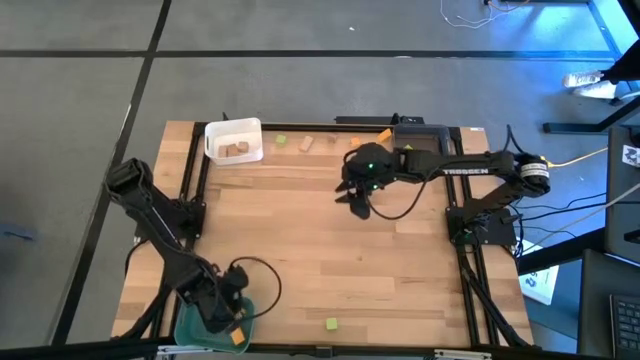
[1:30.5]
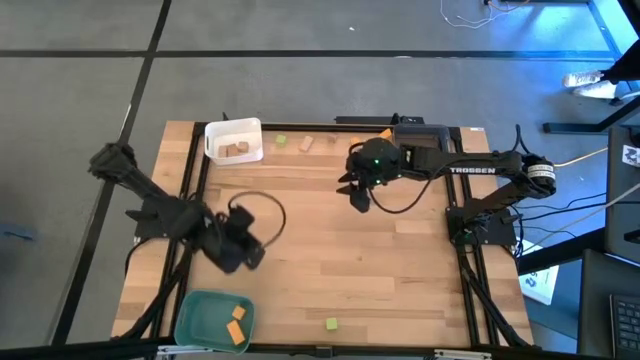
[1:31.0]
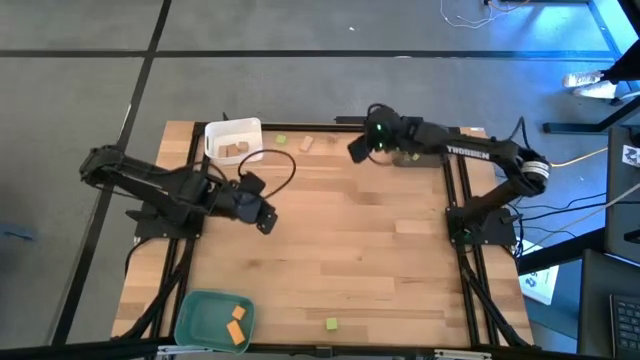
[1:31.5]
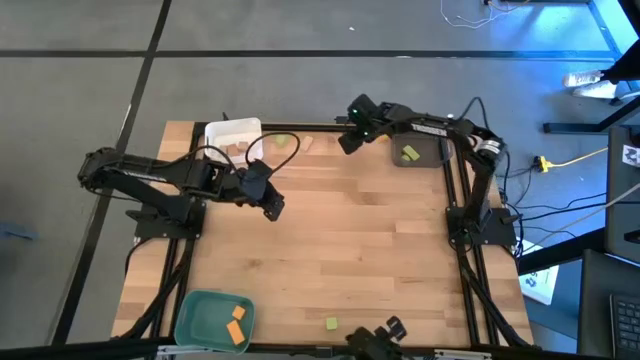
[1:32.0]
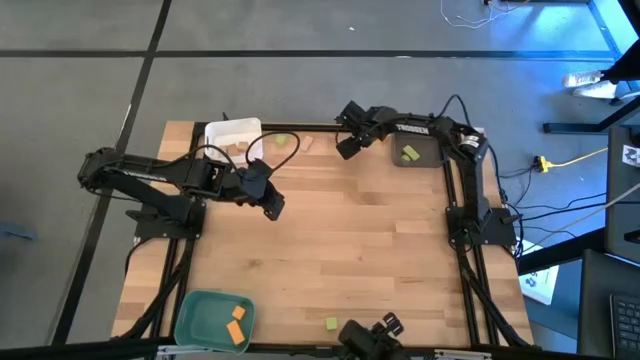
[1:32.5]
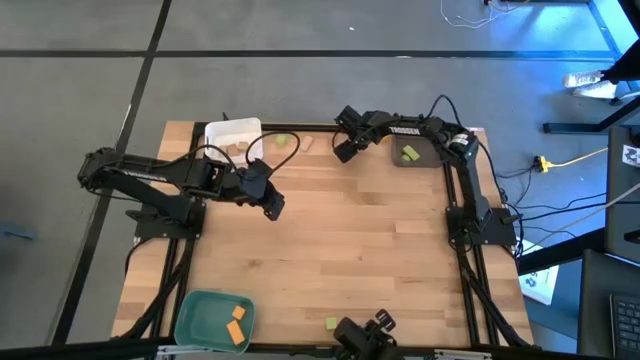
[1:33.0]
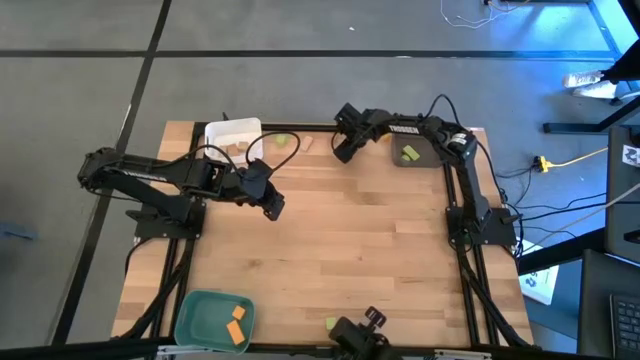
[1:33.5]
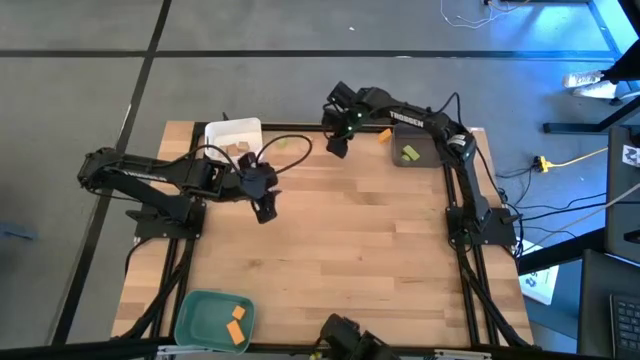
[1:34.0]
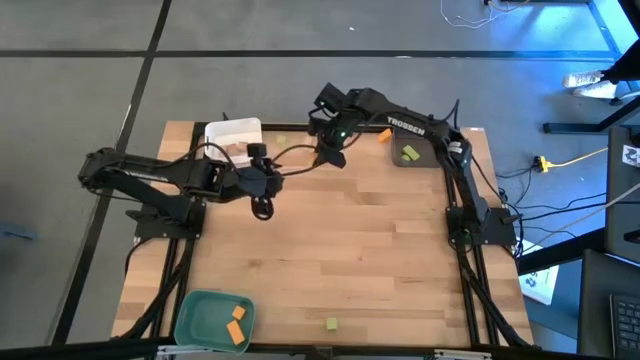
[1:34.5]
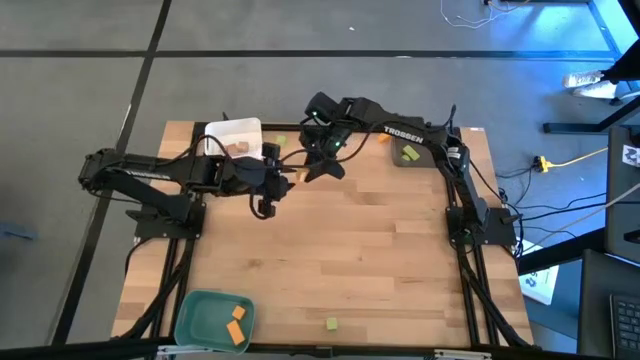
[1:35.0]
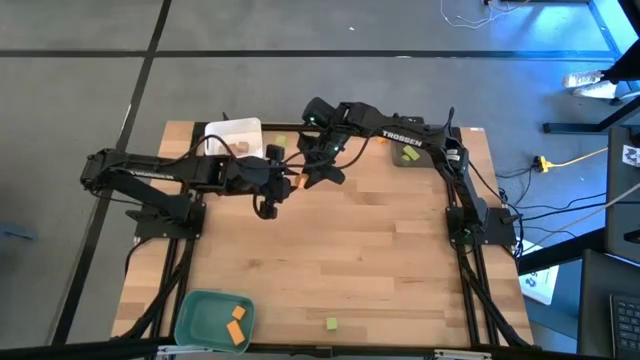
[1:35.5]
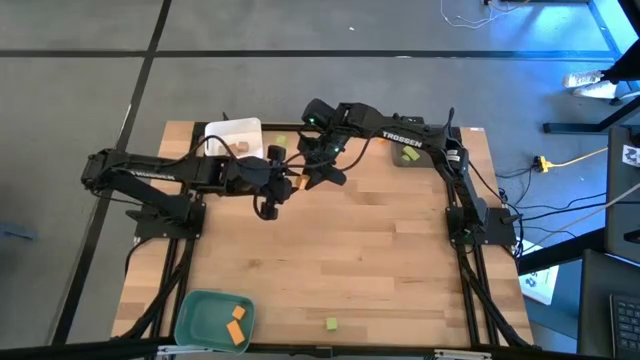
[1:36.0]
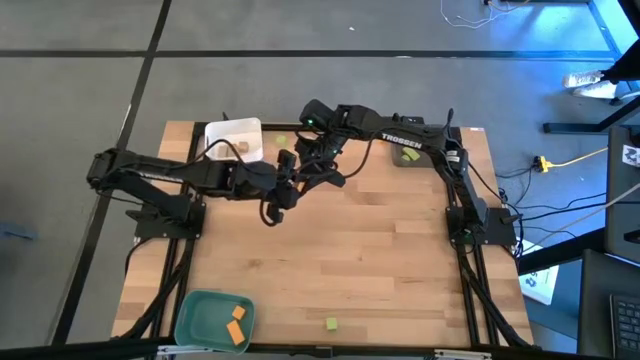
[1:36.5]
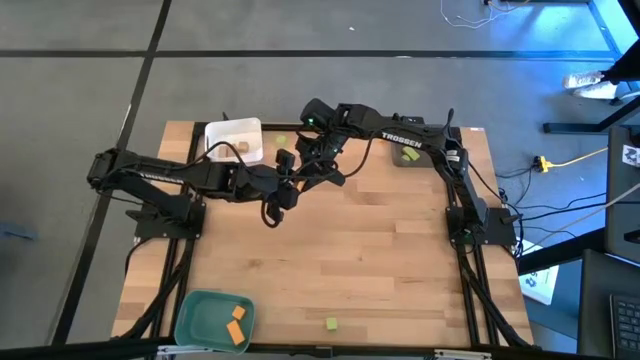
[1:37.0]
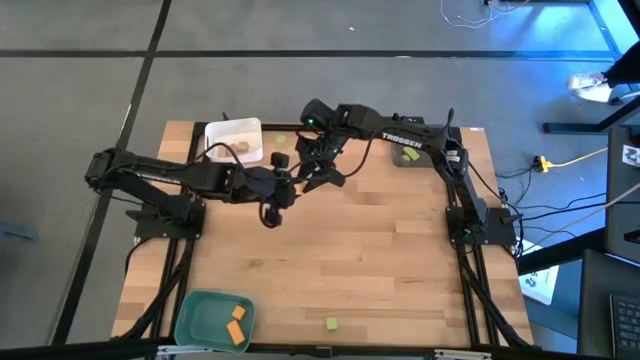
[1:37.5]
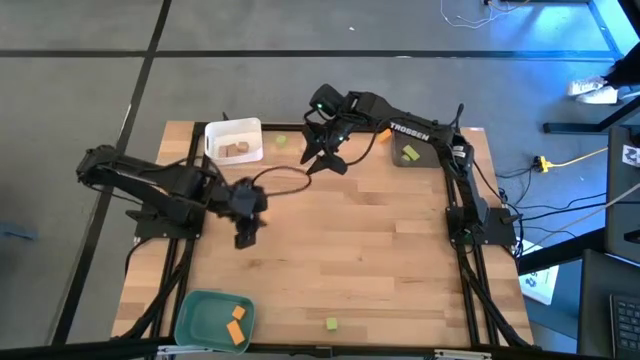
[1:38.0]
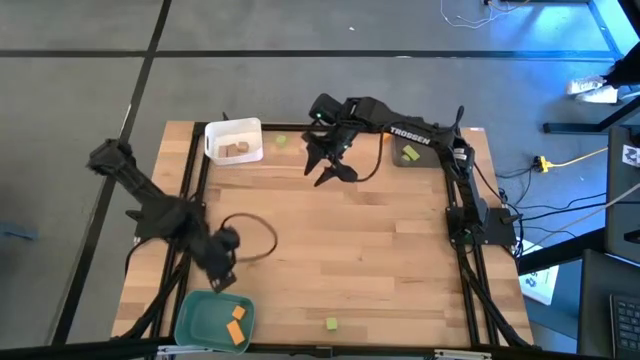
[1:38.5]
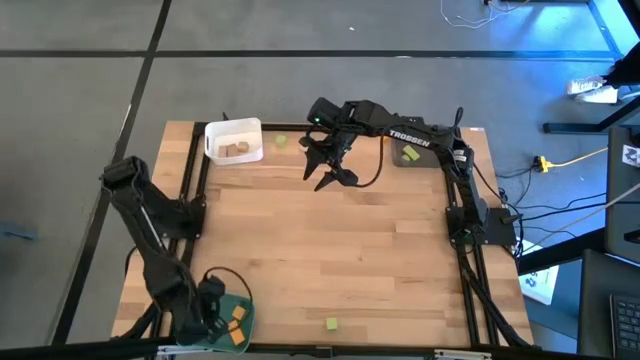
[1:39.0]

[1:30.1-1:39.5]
Task: Sort & place blocks by color
Put the orange block into the green bin

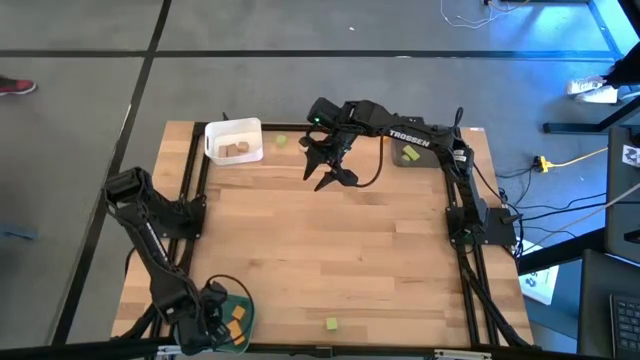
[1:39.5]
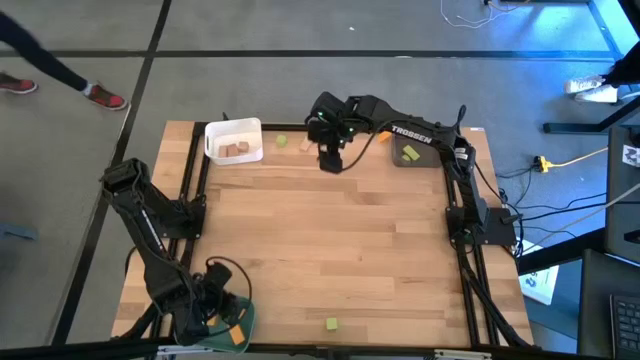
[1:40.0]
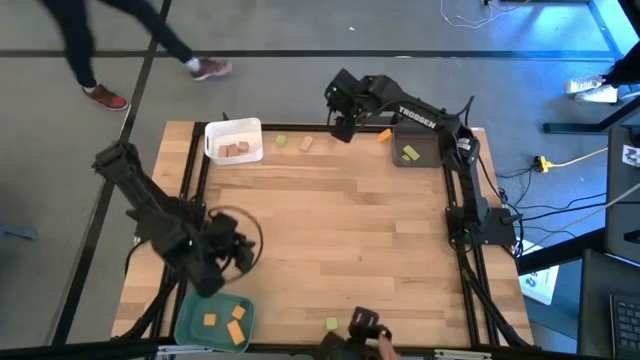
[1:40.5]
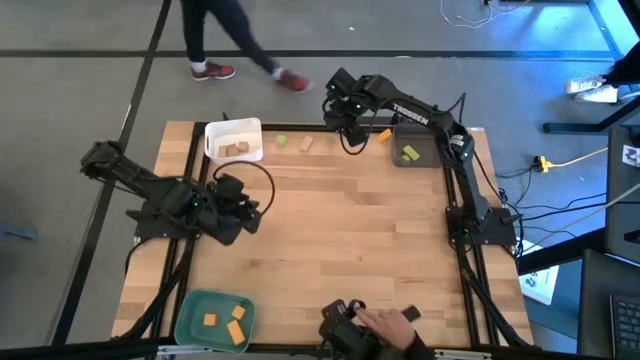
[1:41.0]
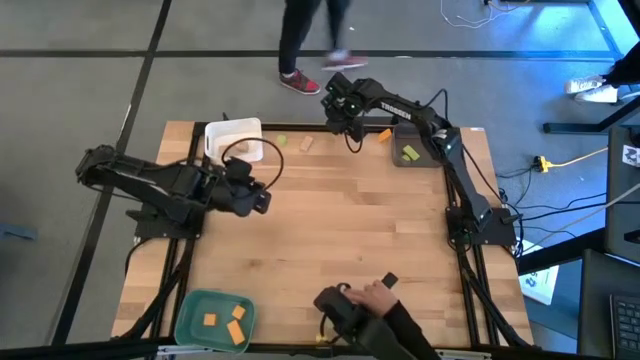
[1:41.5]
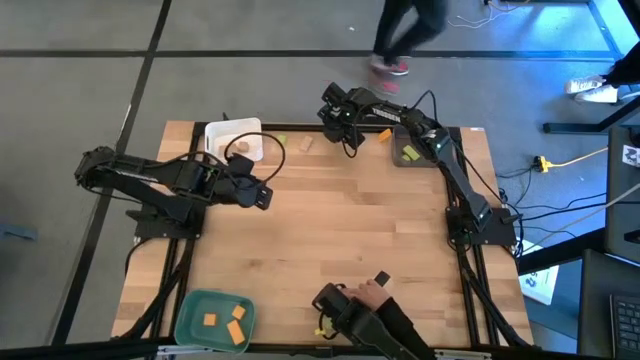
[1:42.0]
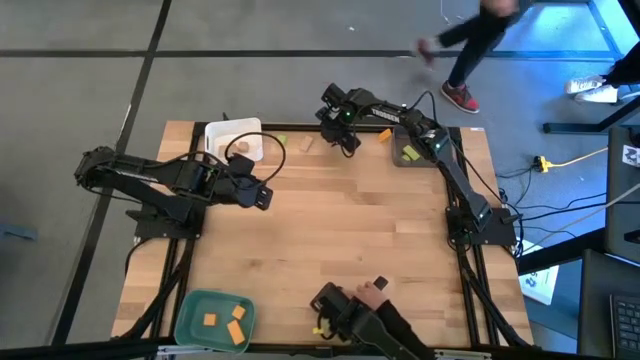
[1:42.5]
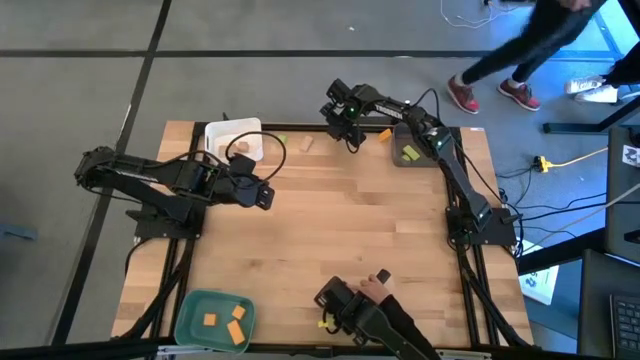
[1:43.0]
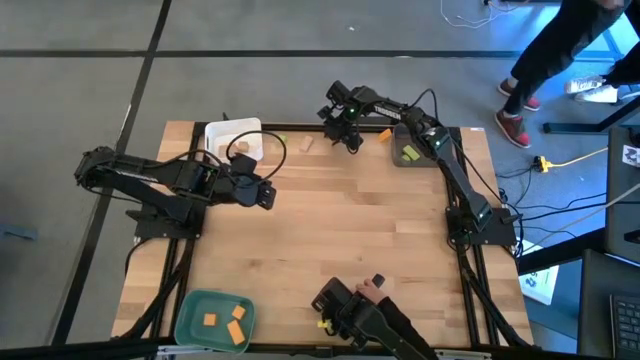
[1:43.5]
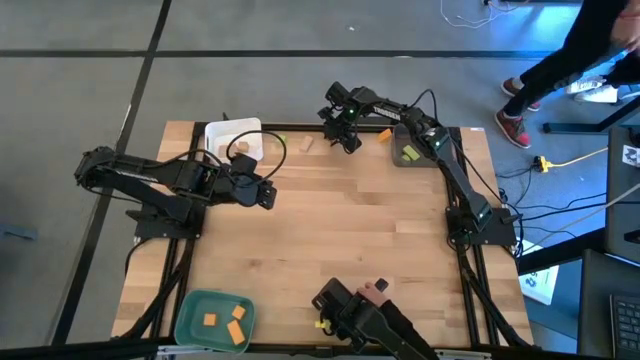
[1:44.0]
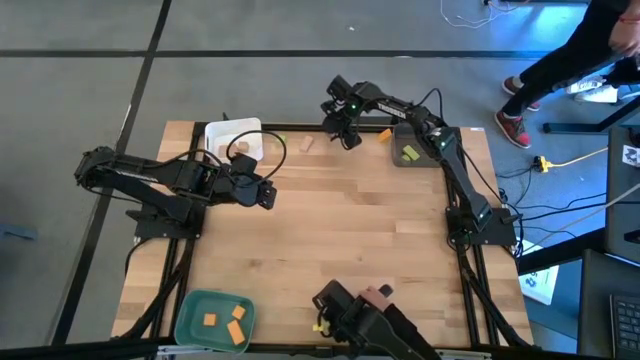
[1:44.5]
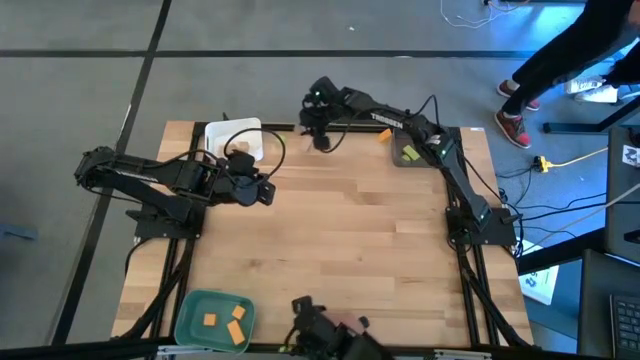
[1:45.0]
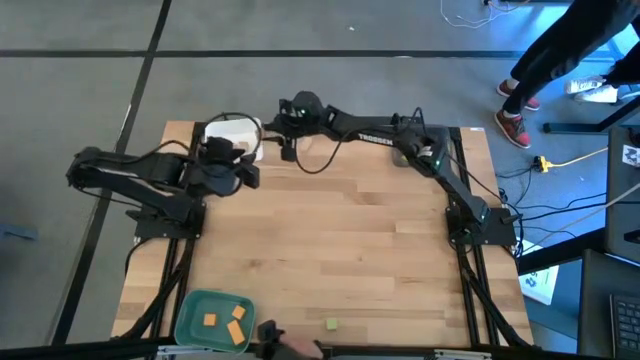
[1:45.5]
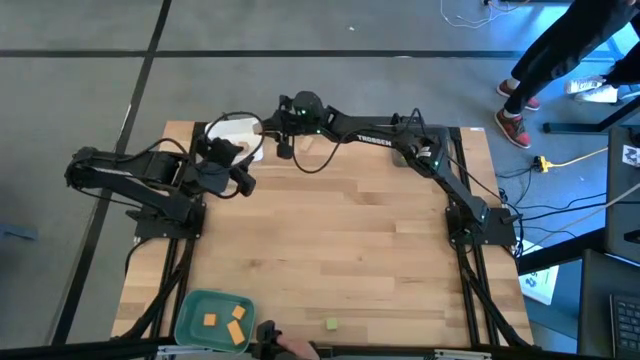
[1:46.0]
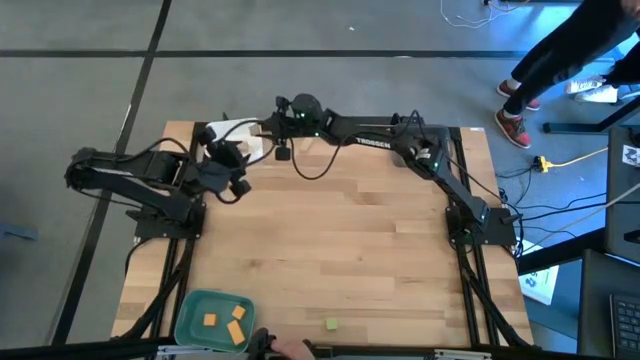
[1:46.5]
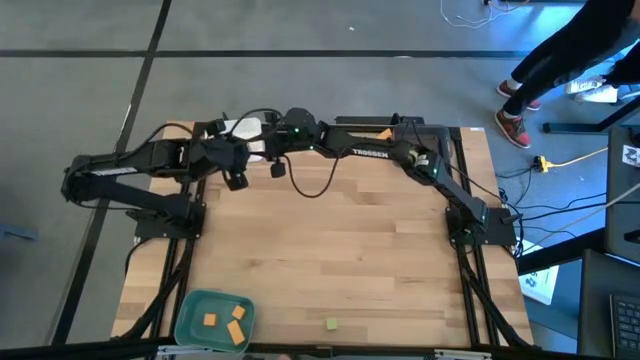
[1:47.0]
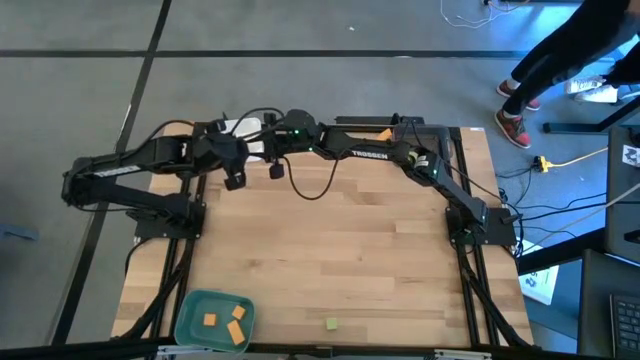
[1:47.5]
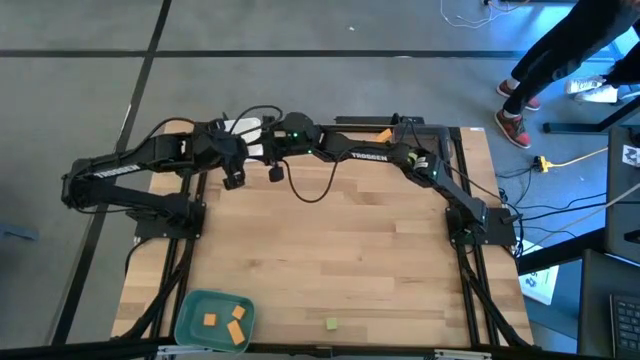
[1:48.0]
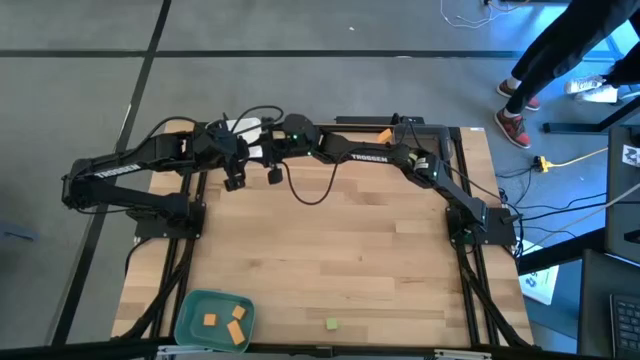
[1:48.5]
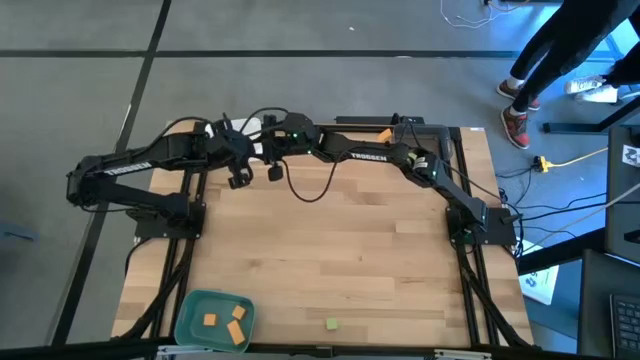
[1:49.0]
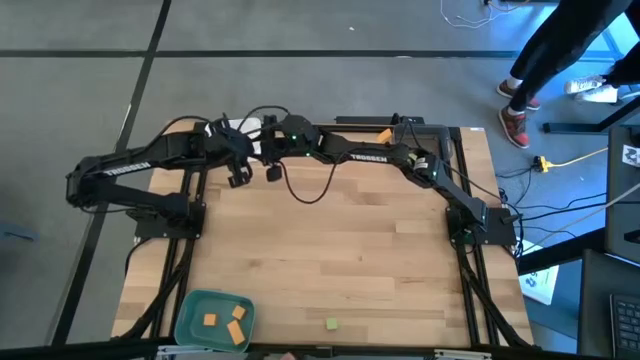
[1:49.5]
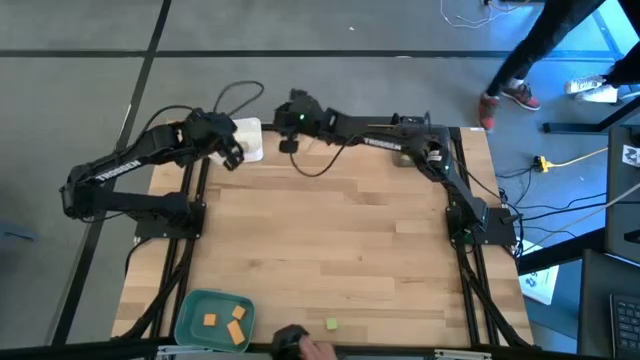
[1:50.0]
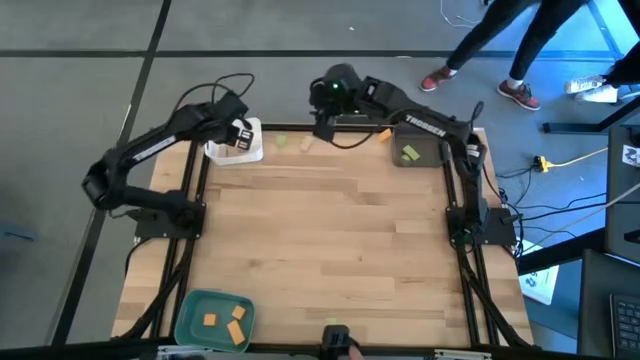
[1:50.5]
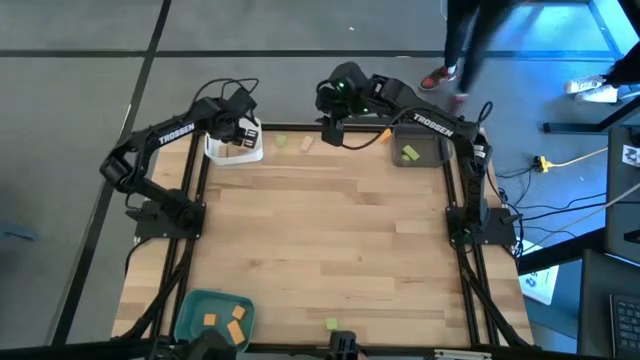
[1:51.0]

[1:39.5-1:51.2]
Put the brown block into the white bin
